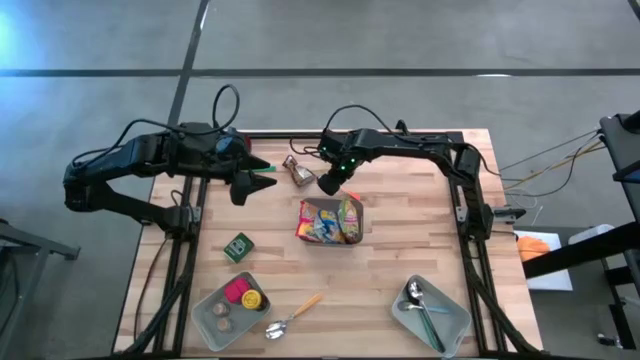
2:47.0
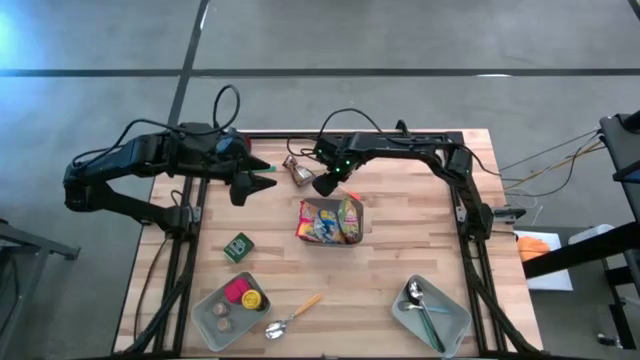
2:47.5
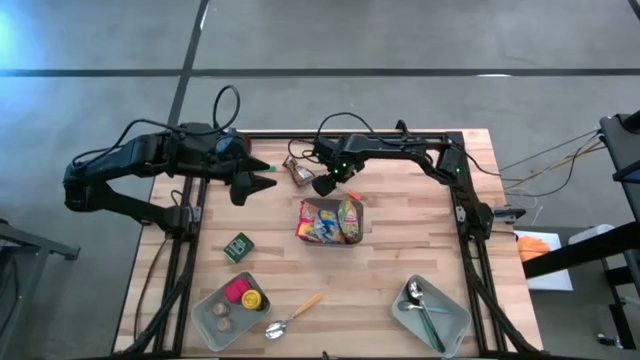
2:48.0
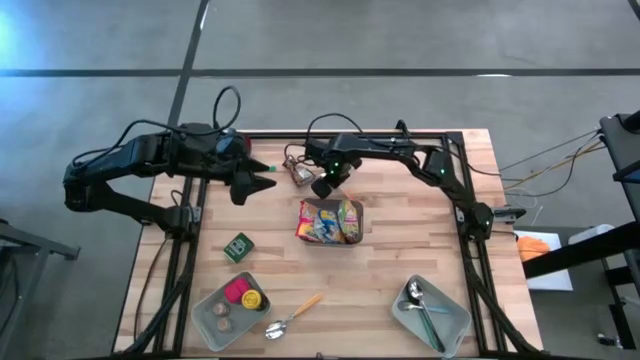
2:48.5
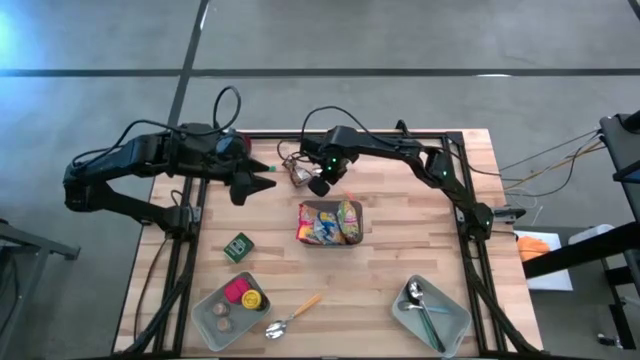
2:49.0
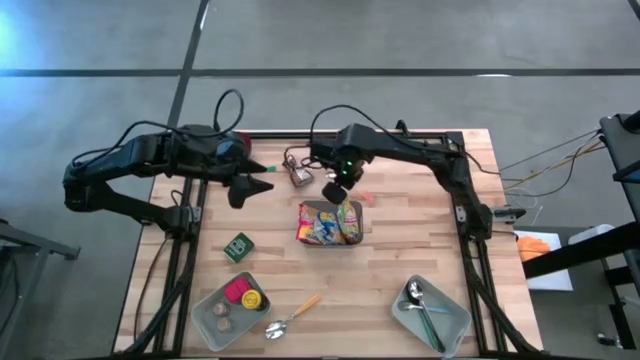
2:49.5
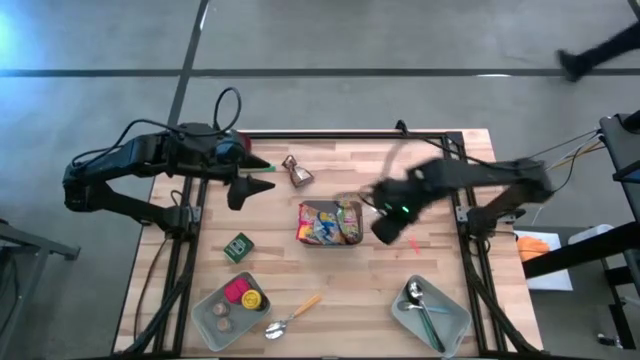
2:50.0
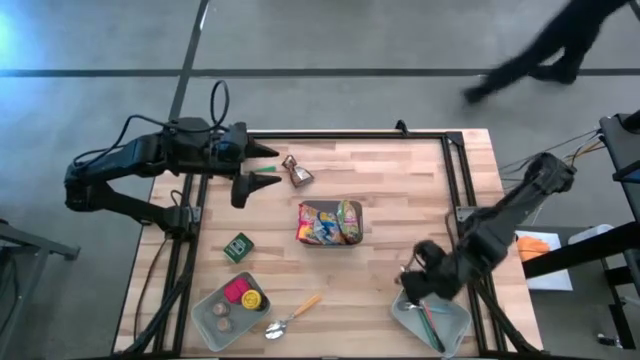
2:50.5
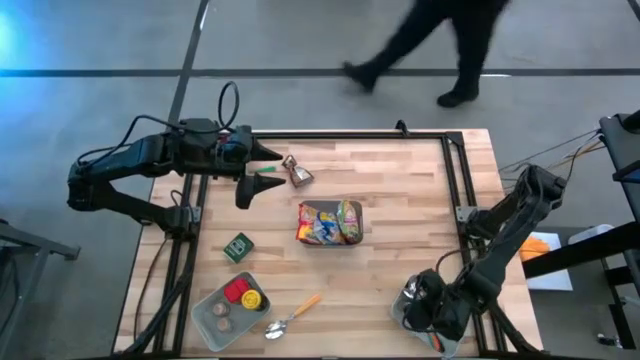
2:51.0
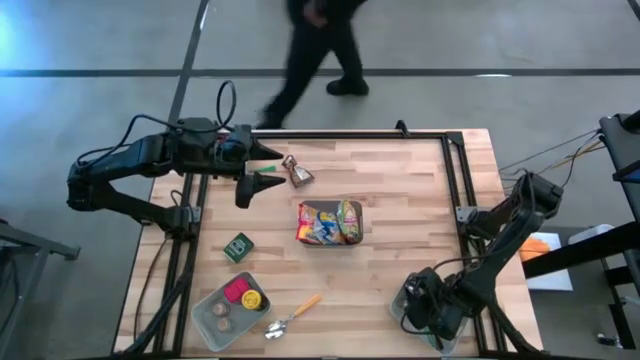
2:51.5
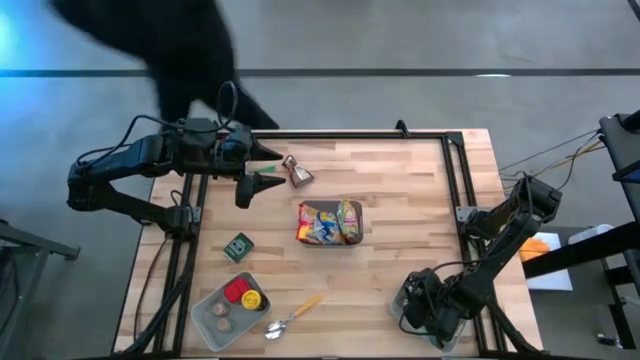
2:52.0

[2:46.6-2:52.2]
Put the orange spoon into the right grey bin

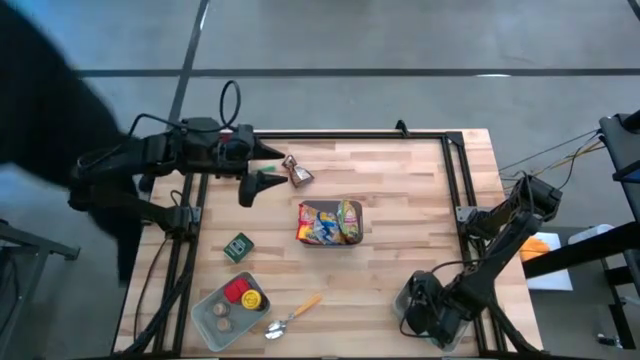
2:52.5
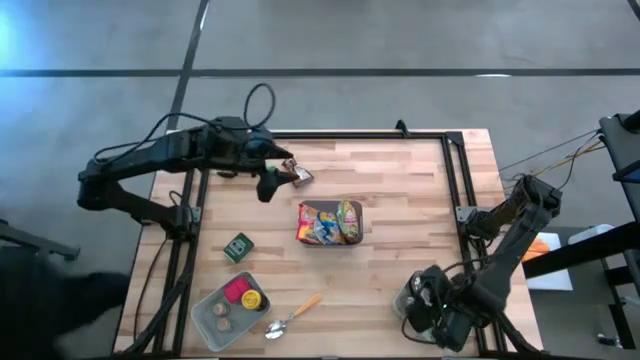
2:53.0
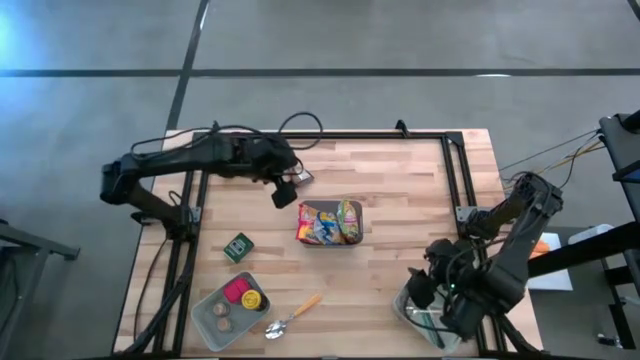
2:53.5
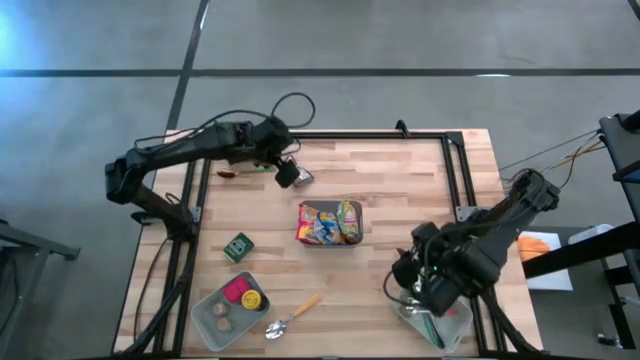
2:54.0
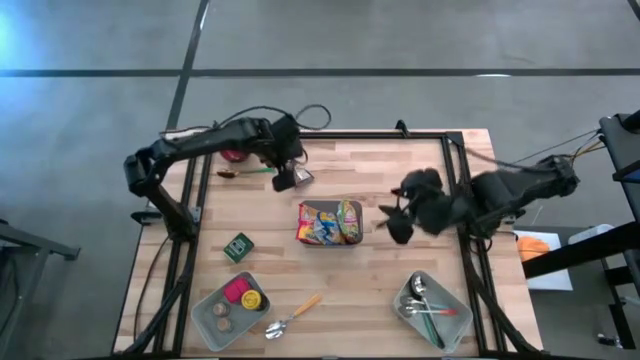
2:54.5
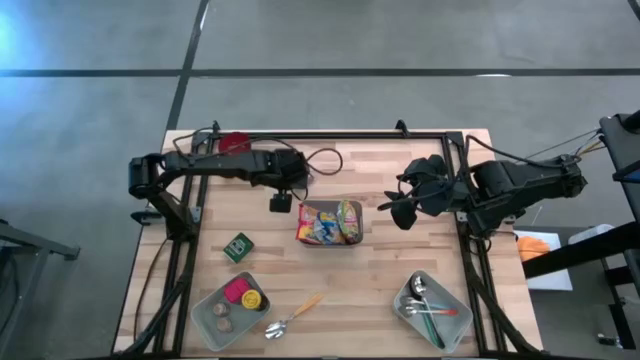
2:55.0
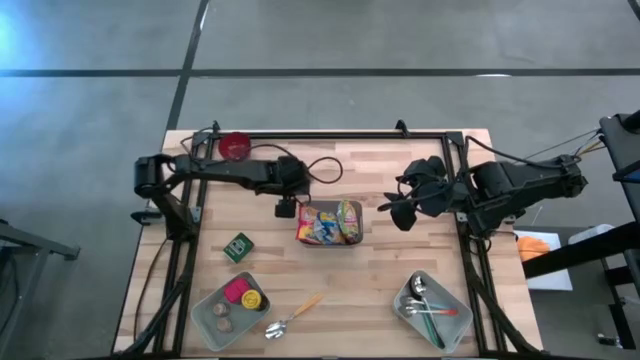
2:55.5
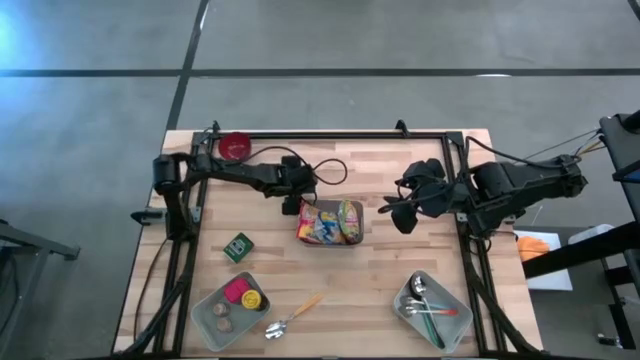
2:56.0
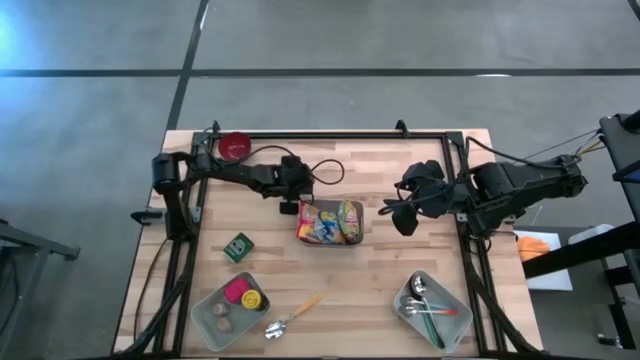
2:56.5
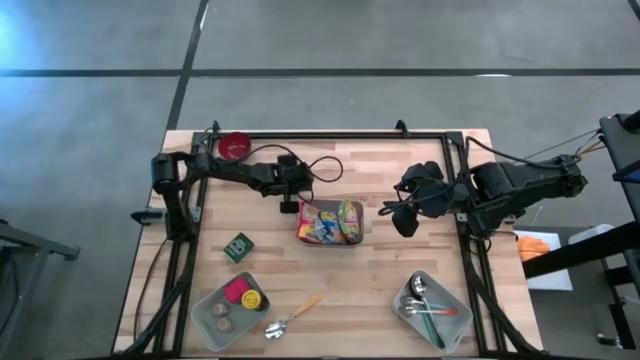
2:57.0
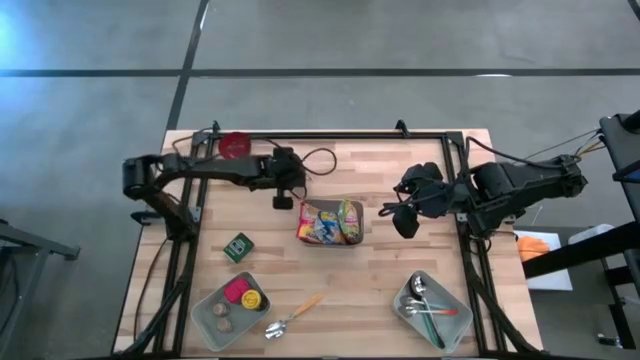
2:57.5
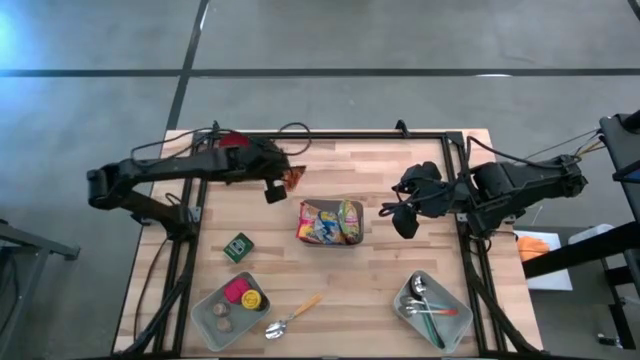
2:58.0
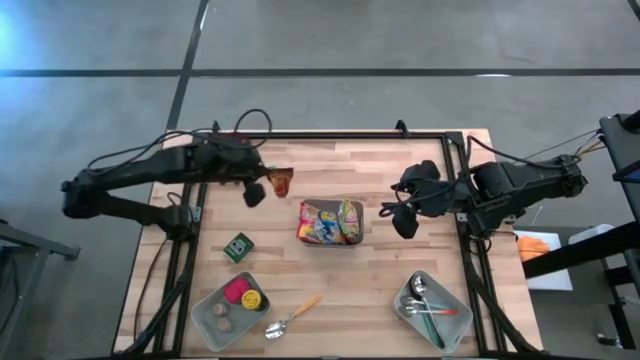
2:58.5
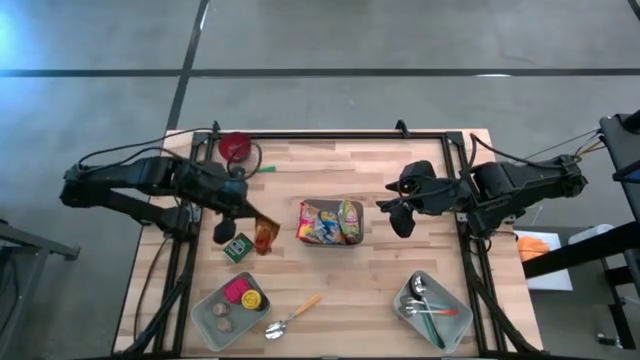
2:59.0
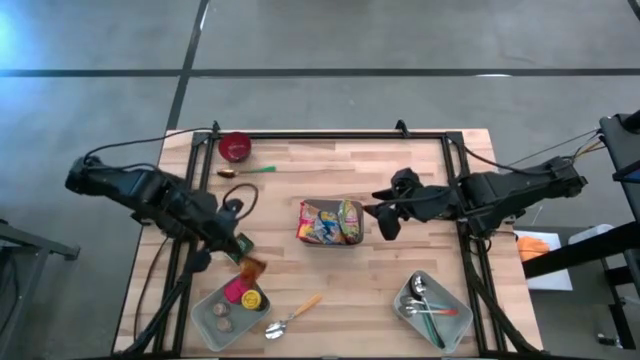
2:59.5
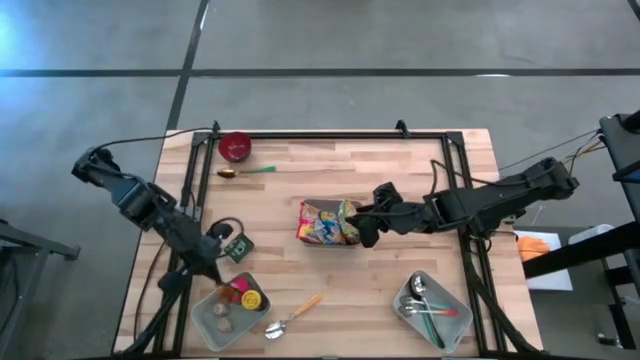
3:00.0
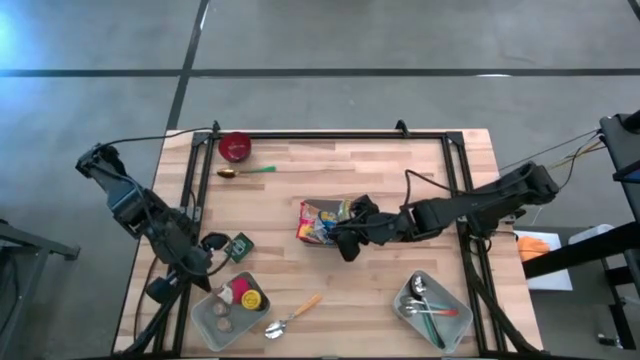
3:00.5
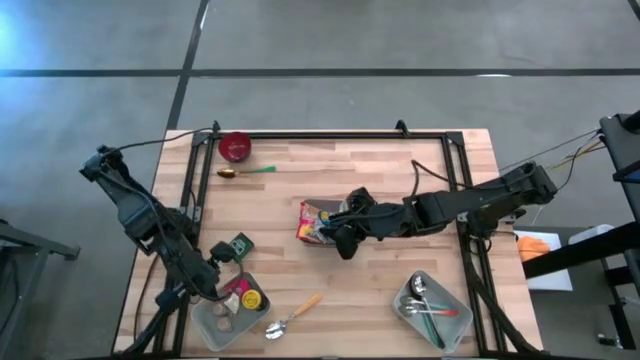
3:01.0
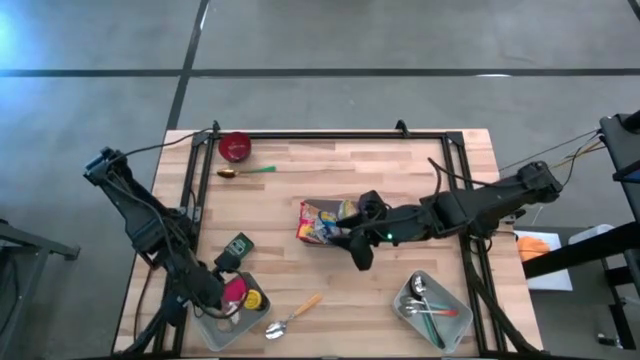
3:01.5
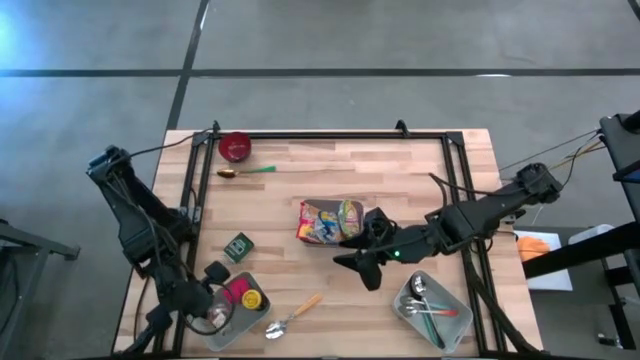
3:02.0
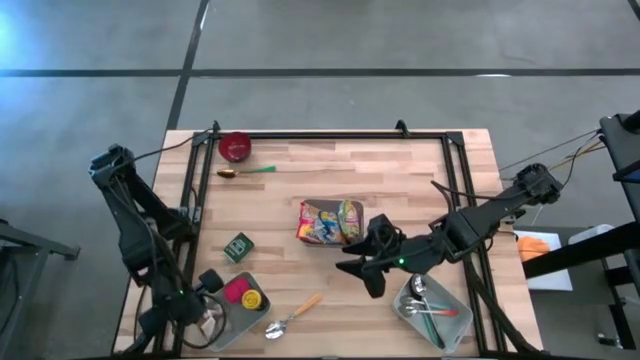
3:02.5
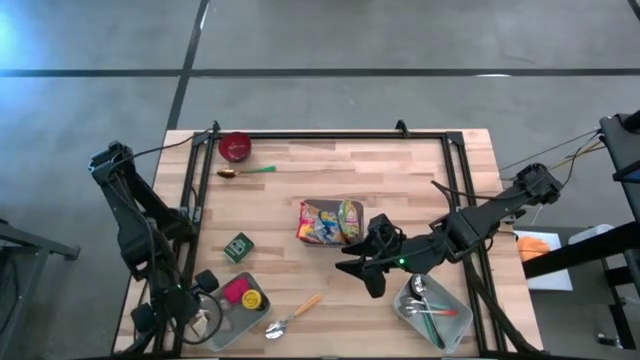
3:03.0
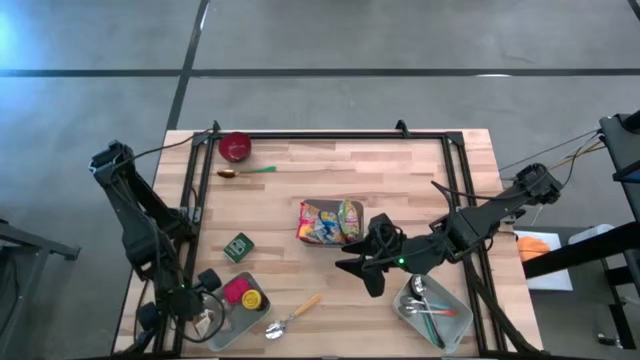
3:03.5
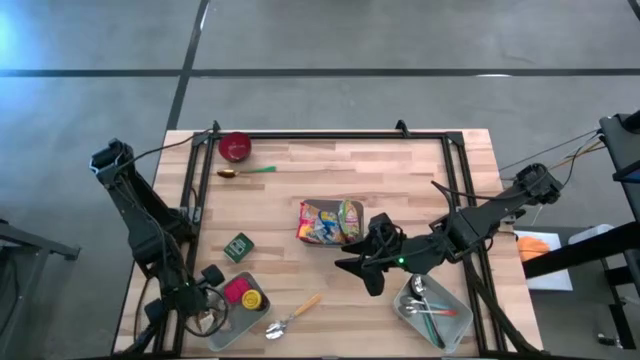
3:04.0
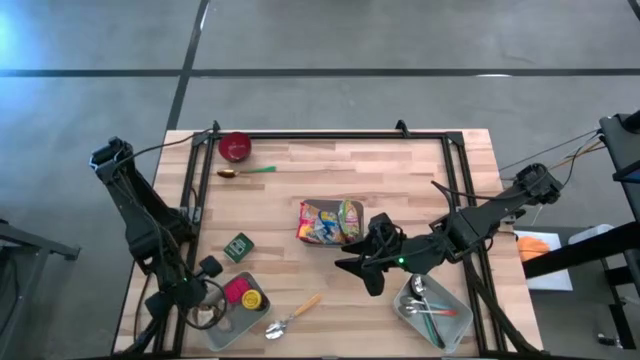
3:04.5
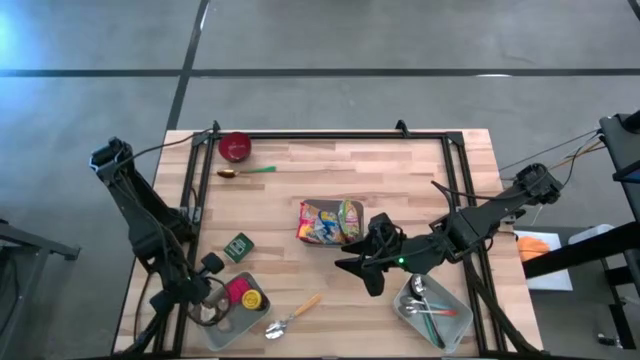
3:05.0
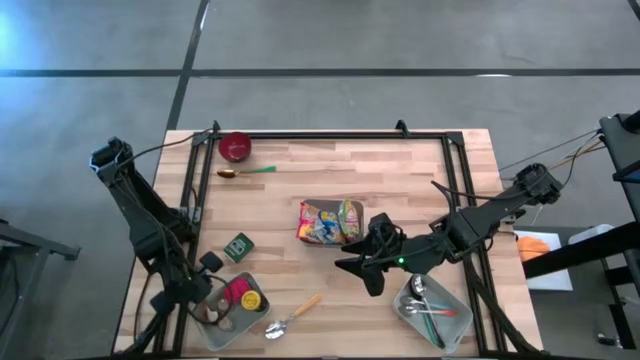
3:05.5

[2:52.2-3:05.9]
Put the orange spice pack into the left grey bin

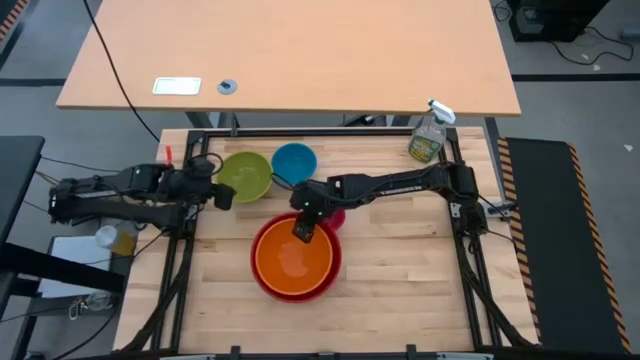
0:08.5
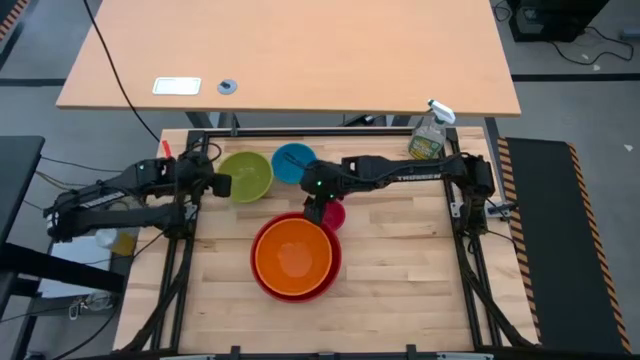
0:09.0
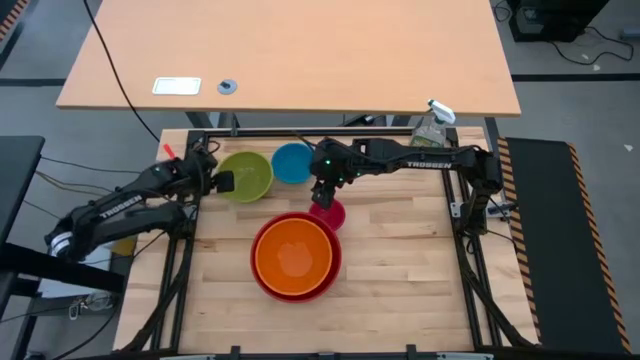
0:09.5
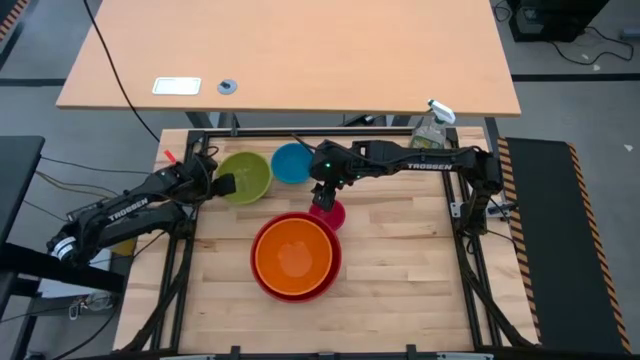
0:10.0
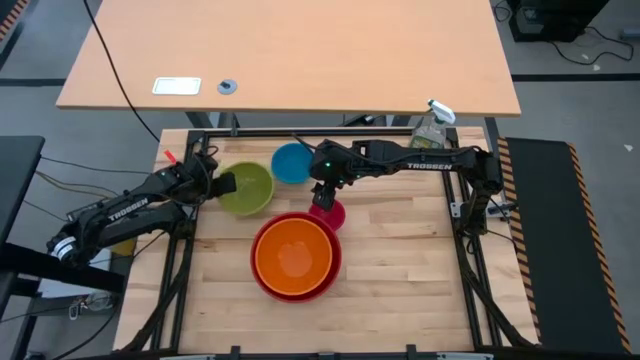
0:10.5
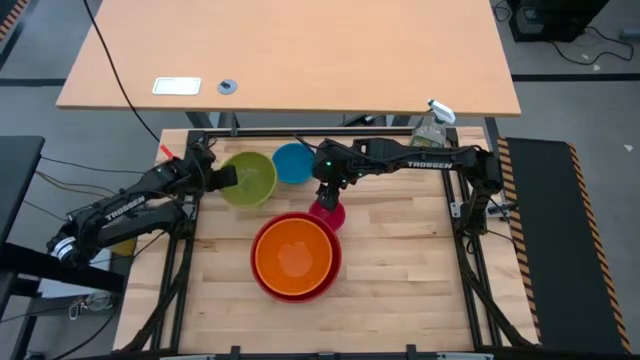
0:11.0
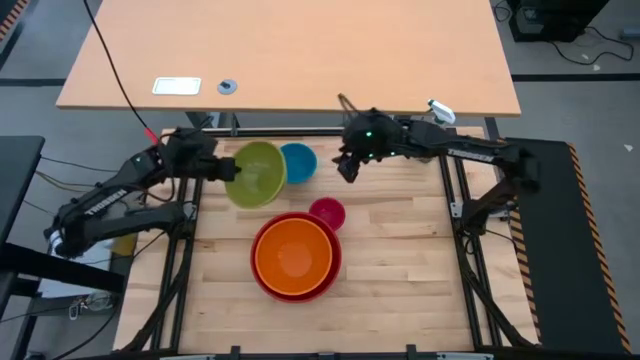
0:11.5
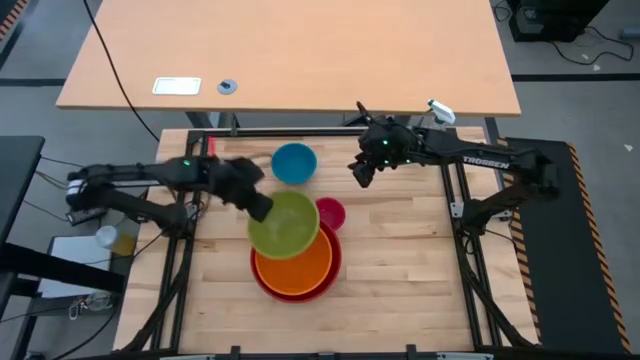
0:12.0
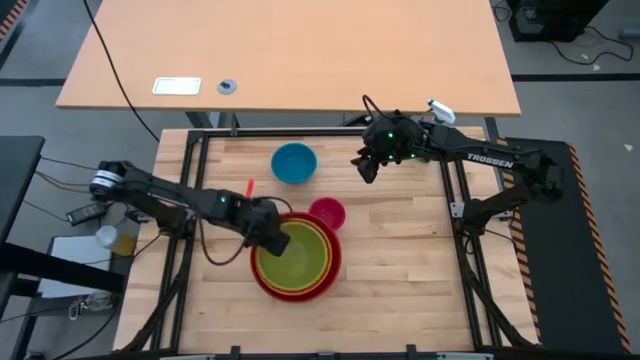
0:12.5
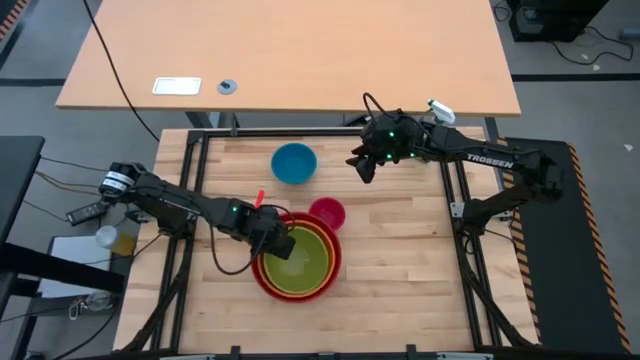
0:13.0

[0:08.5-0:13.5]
Stack the green bowl on top of the orange bowl
